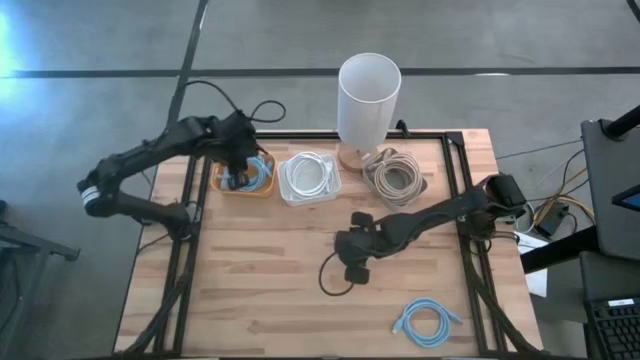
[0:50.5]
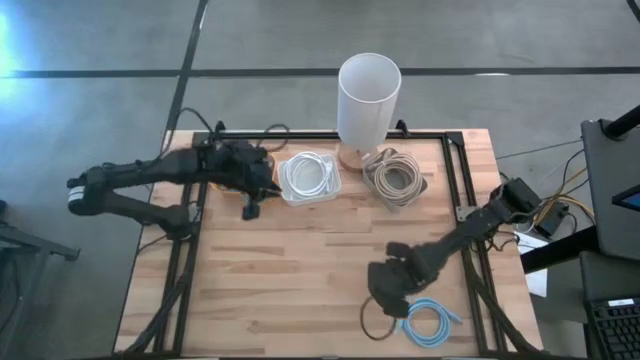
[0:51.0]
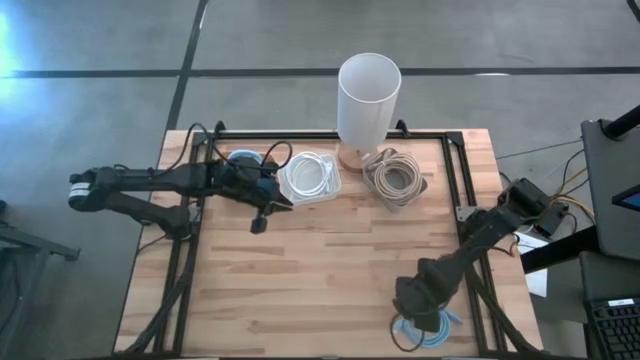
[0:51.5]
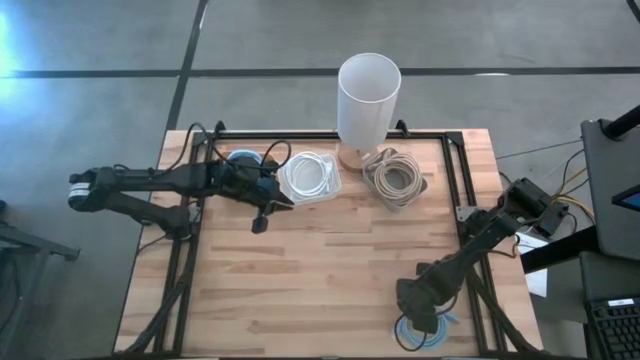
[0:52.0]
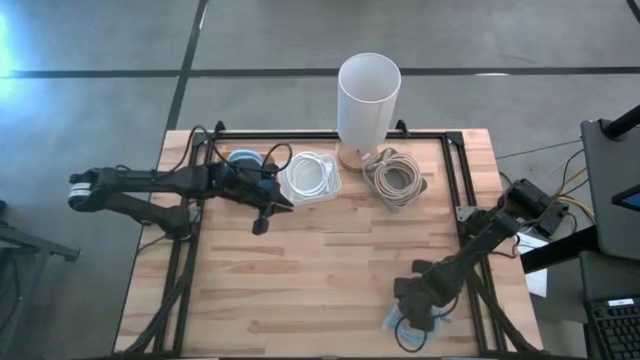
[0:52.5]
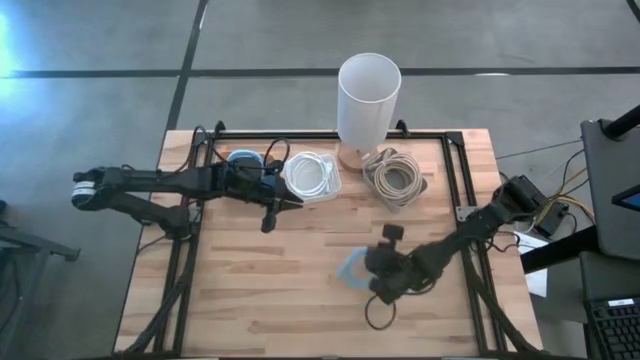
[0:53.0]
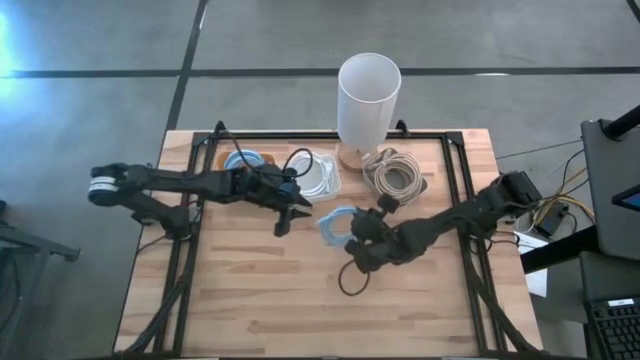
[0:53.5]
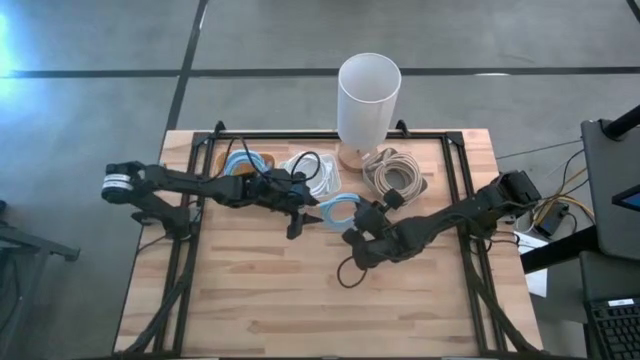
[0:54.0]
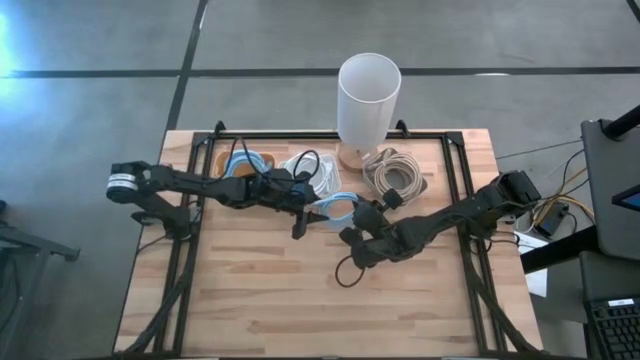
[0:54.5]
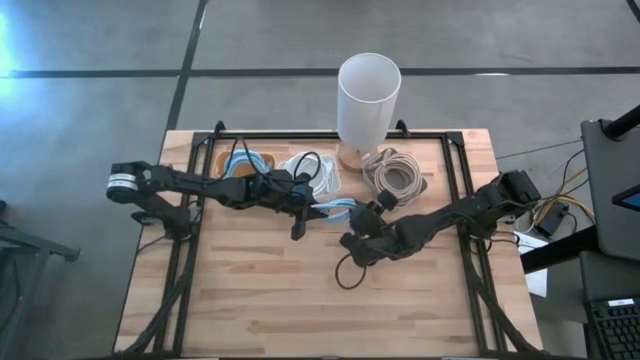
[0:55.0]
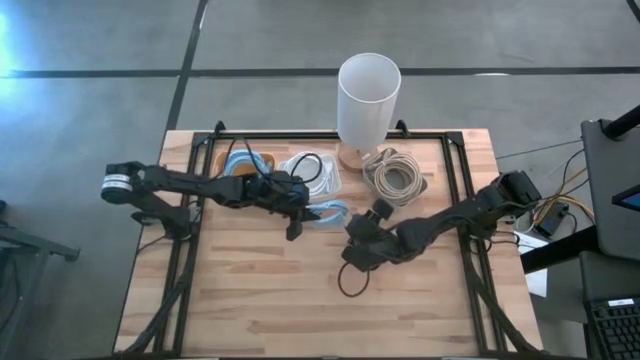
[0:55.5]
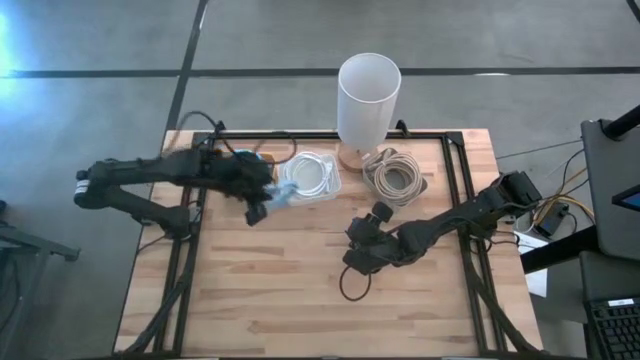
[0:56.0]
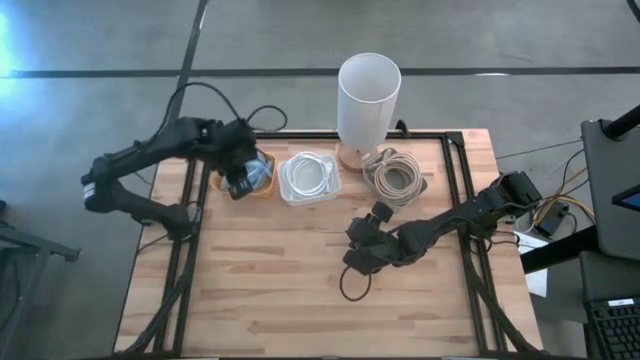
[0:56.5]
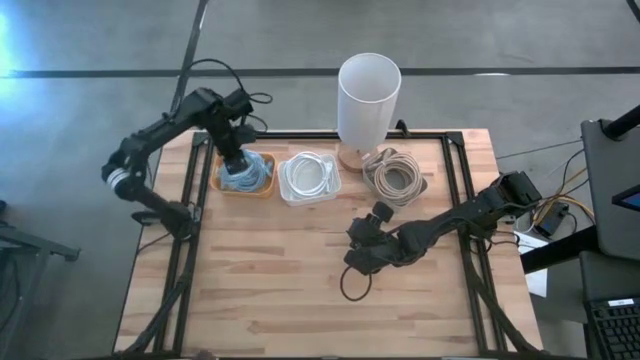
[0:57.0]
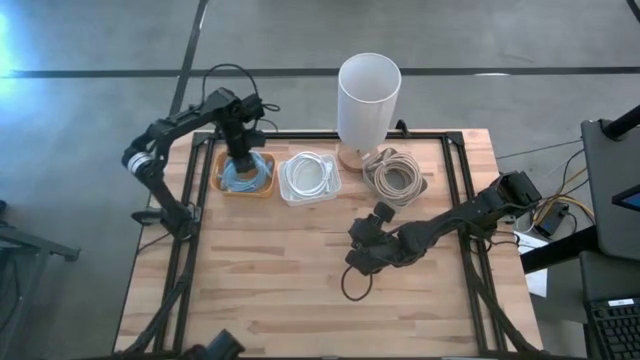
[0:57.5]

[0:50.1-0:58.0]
Task: Pick & Place USB Port
Put the blue USB cable into the yellow bin

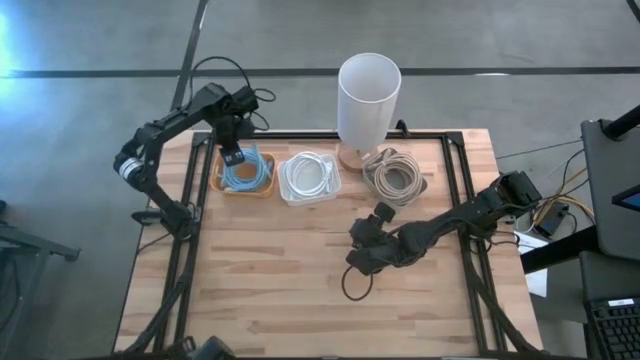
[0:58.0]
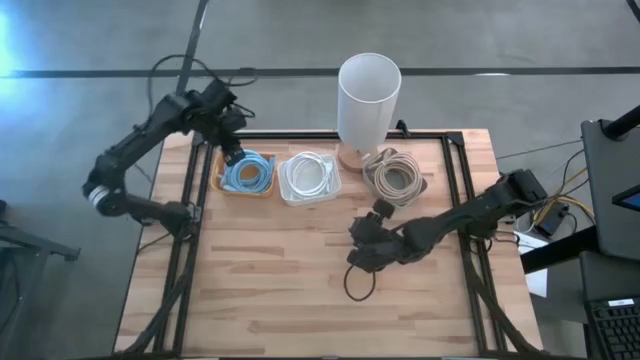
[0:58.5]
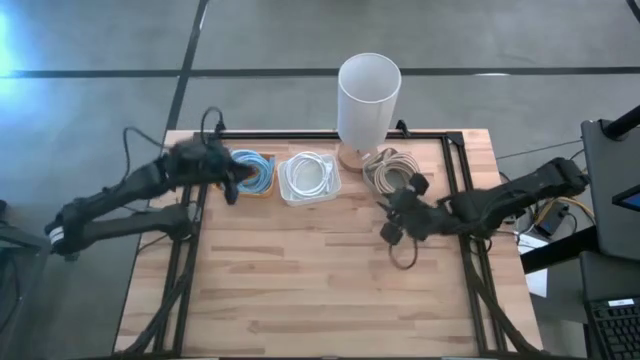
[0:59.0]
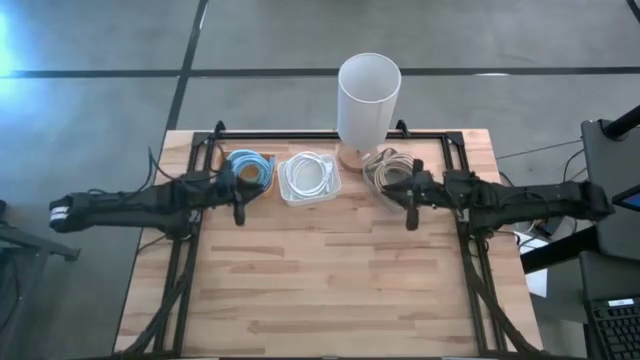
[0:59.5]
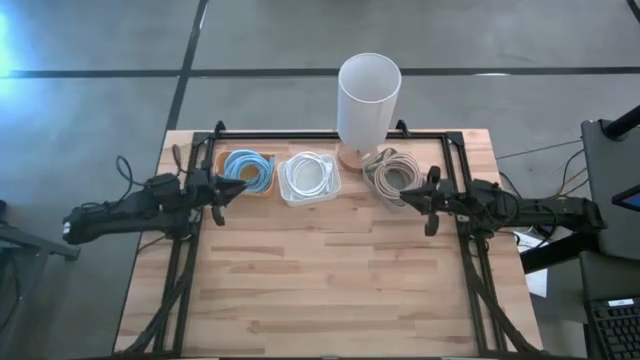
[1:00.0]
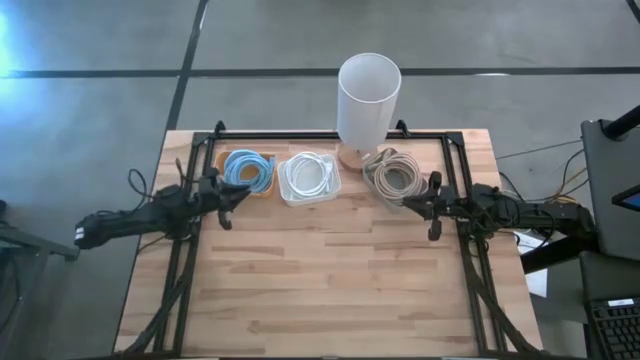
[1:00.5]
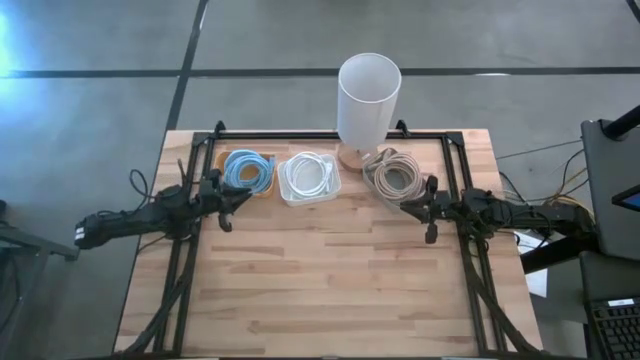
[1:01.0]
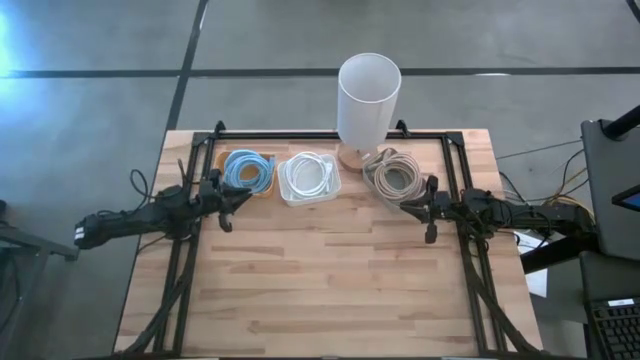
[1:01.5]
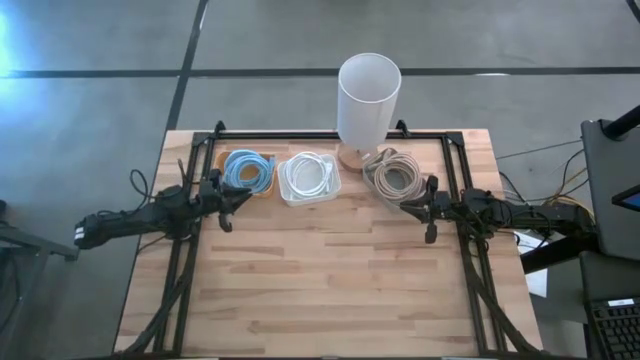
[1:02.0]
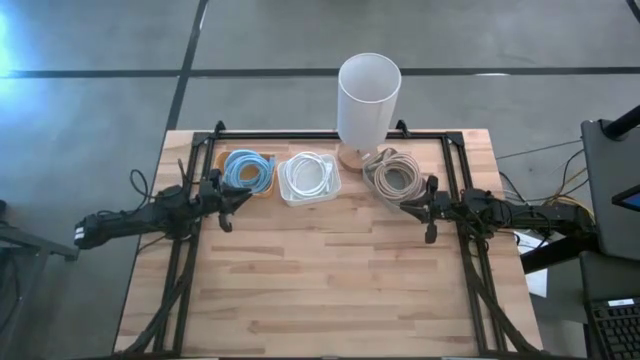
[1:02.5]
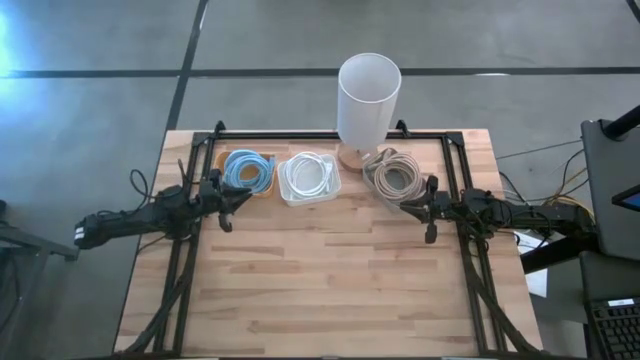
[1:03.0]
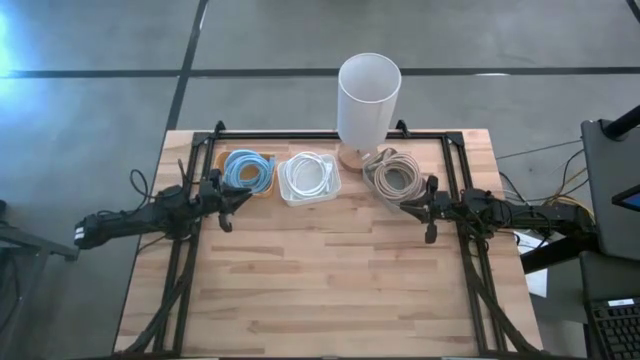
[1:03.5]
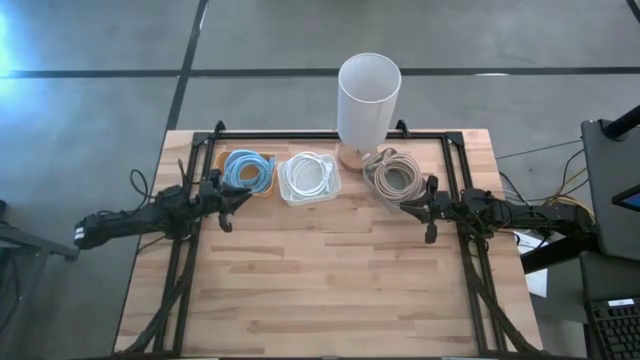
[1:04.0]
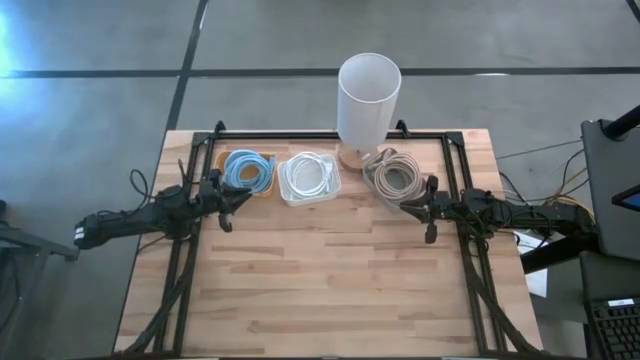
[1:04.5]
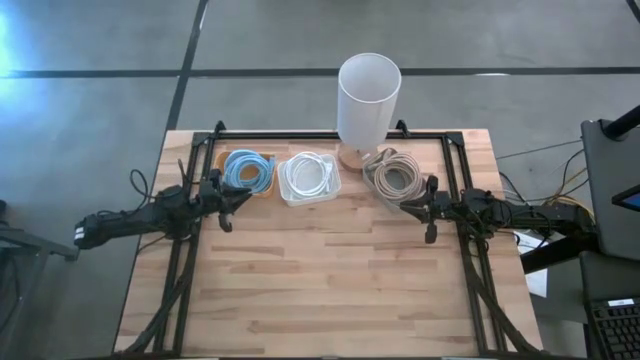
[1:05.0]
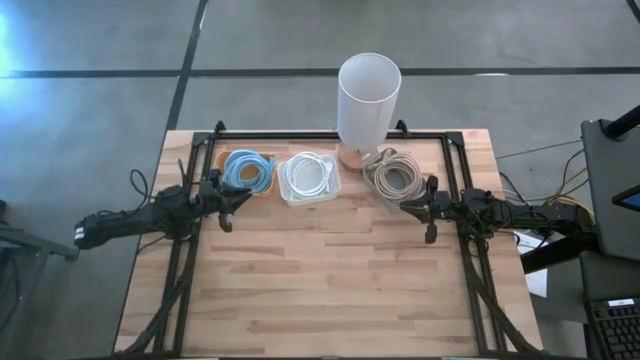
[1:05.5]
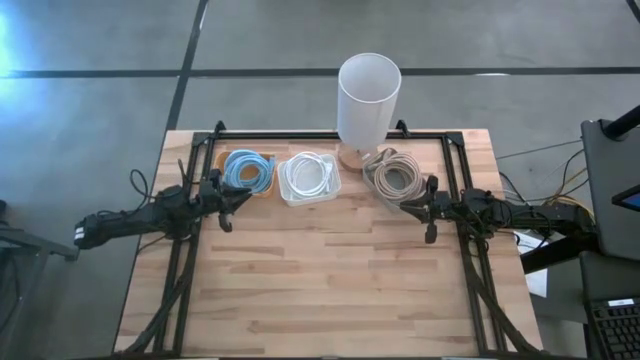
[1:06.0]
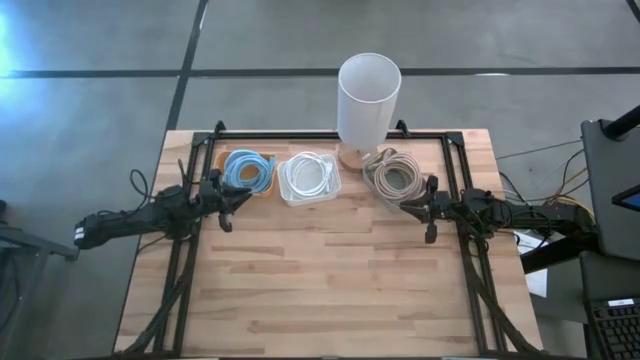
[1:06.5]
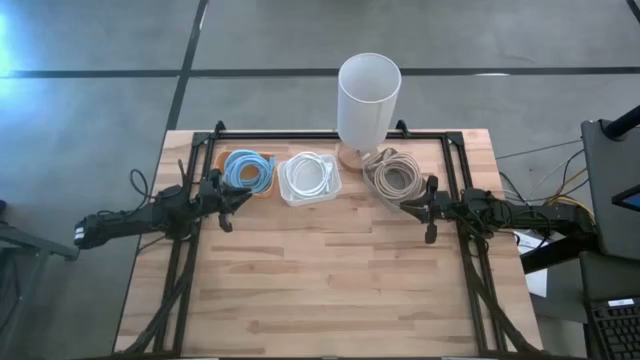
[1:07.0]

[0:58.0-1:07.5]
Return to Home Position

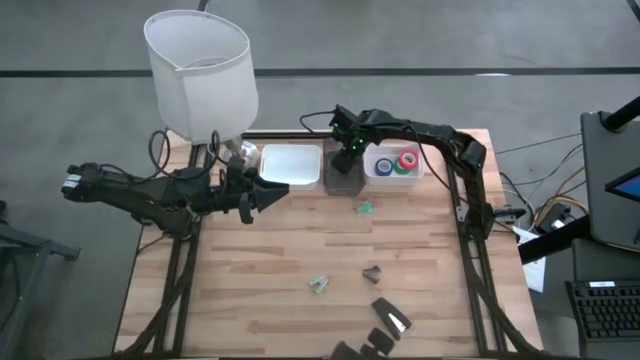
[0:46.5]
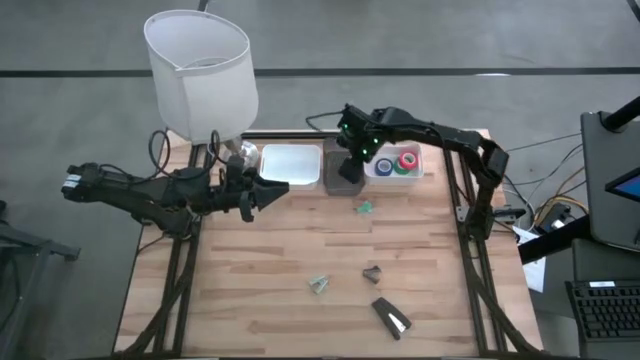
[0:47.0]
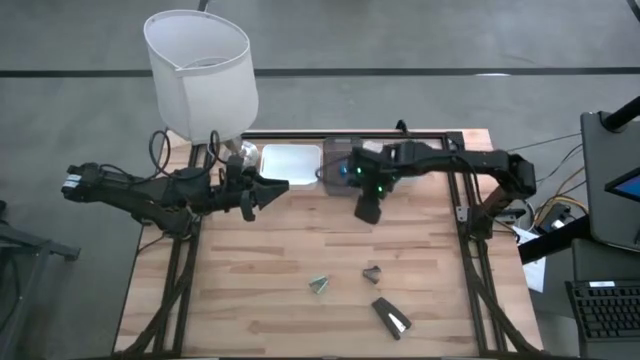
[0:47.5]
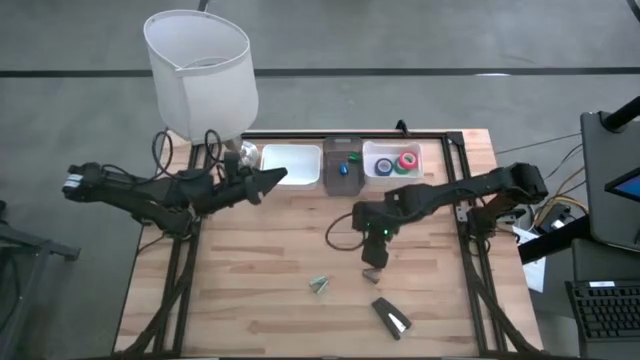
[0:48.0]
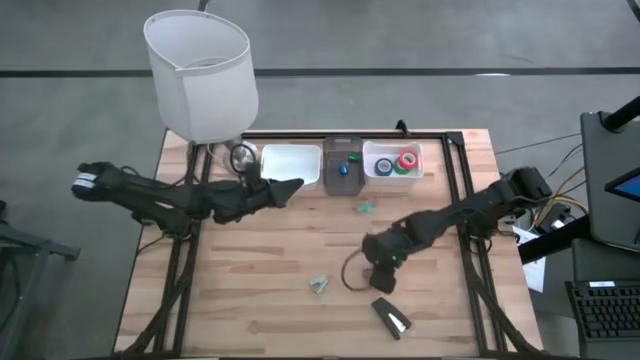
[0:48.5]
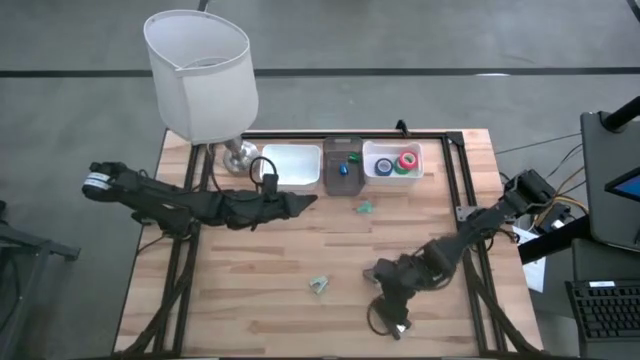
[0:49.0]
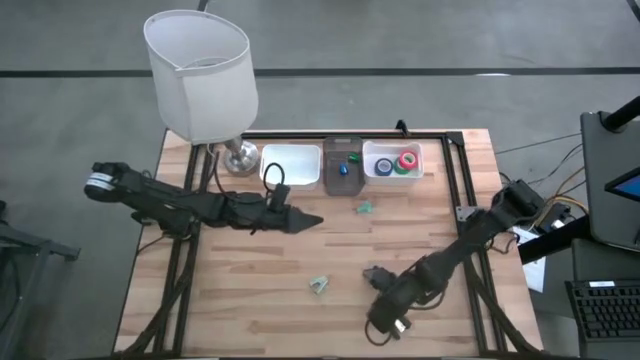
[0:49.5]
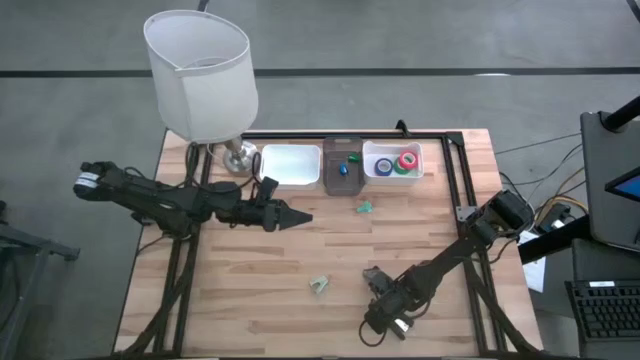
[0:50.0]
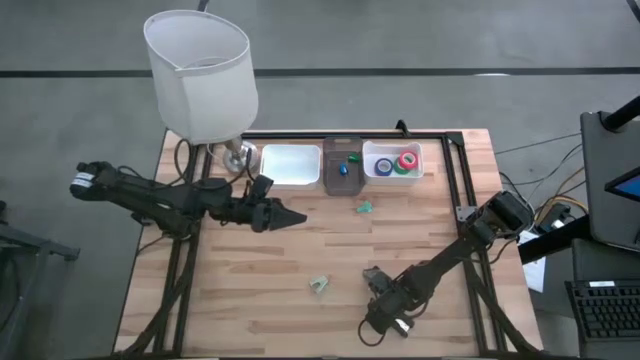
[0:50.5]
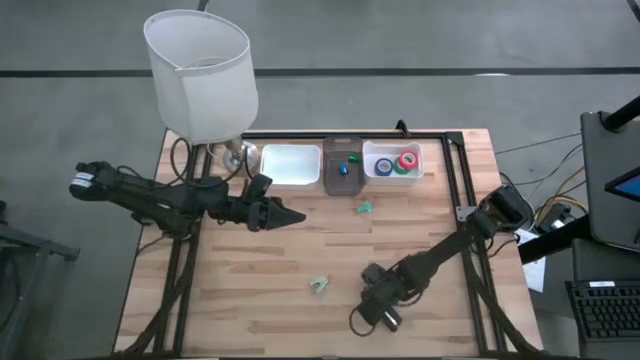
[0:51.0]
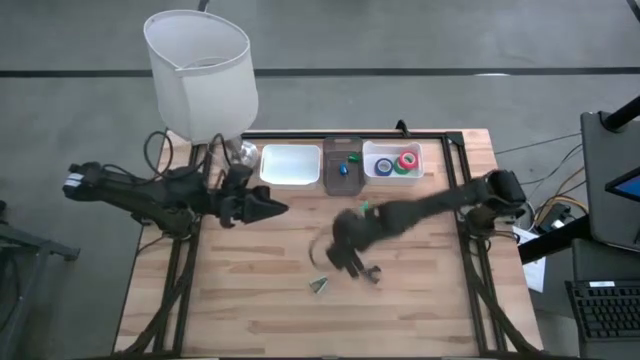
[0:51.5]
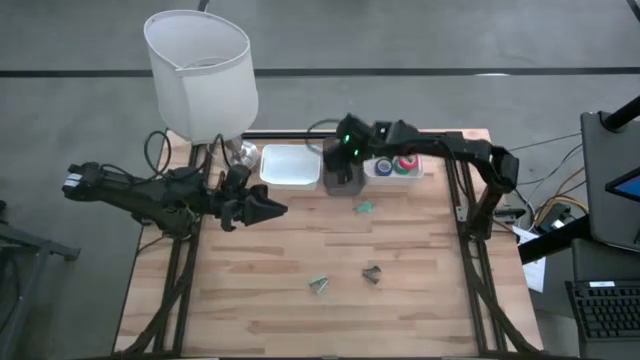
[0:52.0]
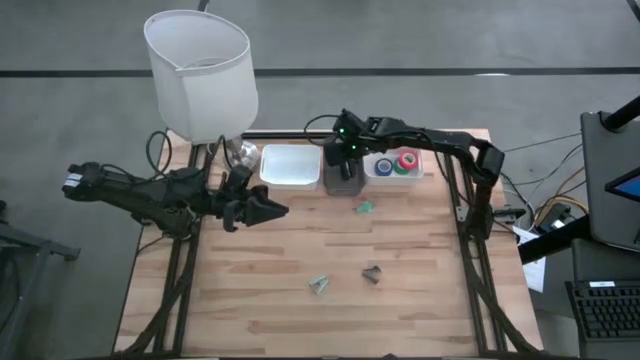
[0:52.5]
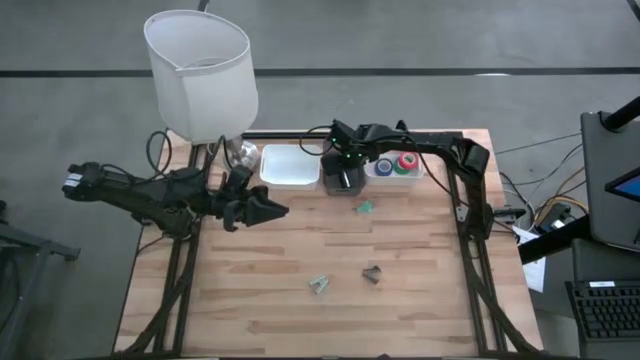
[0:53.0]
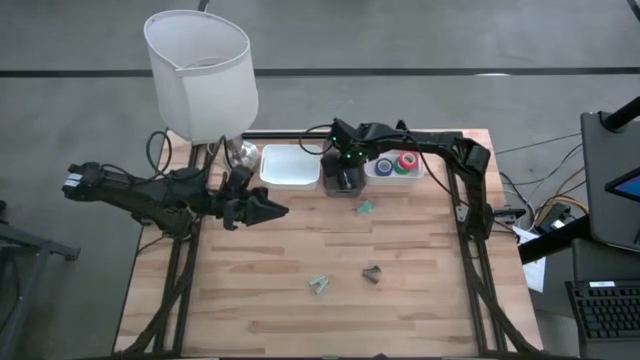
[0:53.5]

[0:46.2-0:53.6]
Task: Pick and place Stapler, Stapler remover, tape
Put the black stapler into the black transparent bin
